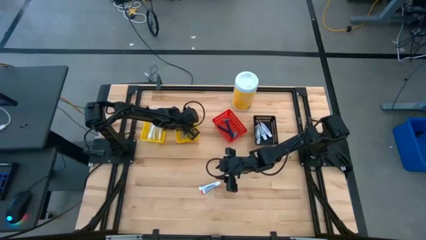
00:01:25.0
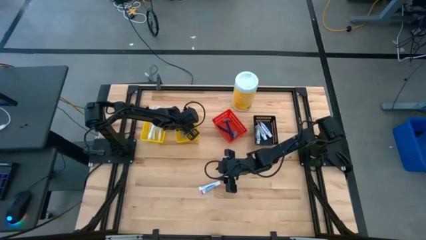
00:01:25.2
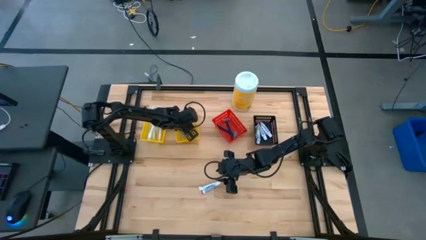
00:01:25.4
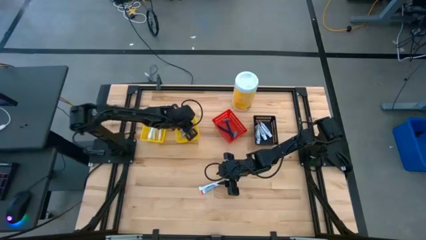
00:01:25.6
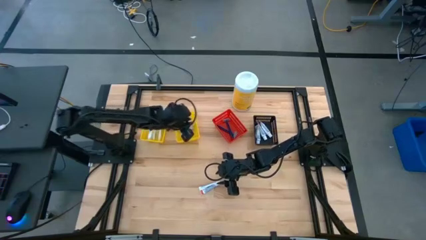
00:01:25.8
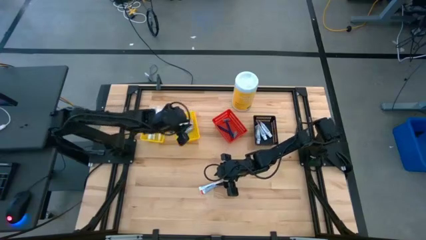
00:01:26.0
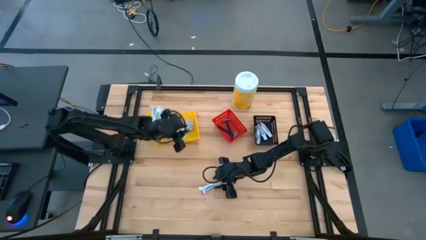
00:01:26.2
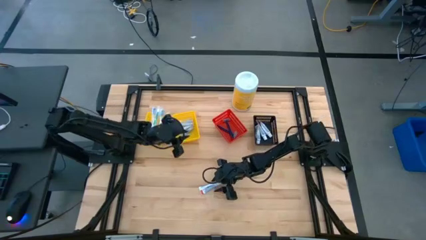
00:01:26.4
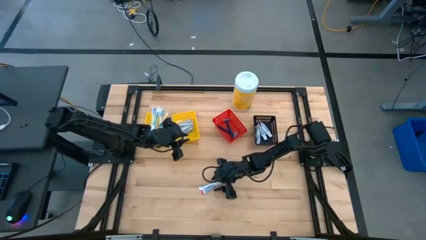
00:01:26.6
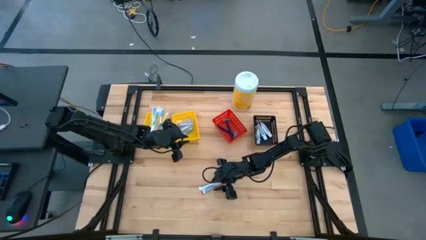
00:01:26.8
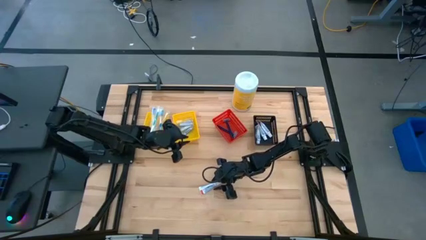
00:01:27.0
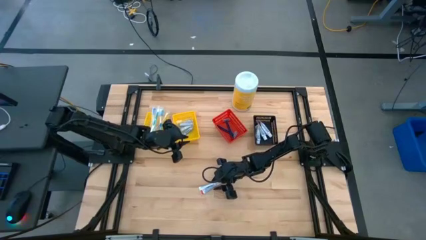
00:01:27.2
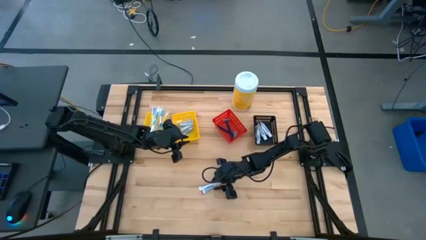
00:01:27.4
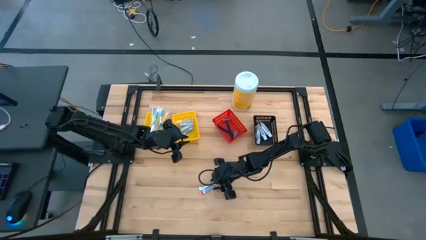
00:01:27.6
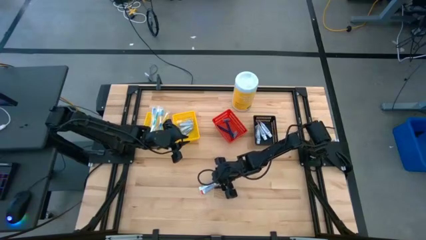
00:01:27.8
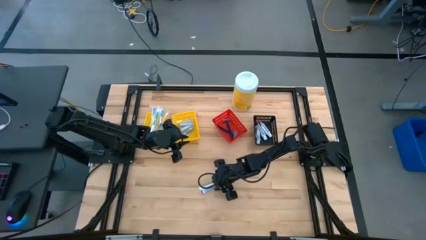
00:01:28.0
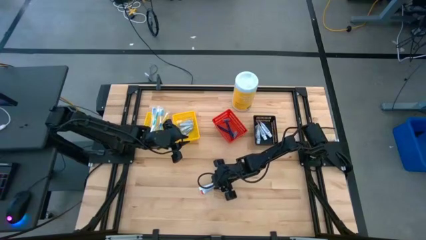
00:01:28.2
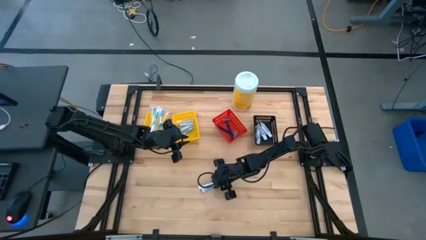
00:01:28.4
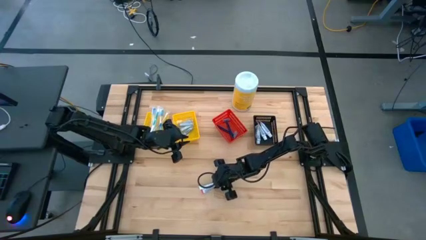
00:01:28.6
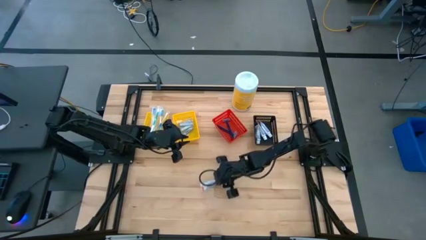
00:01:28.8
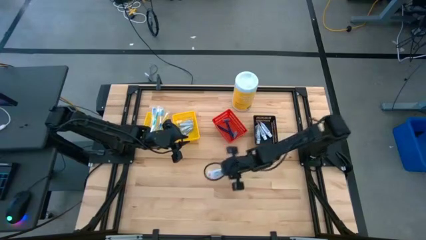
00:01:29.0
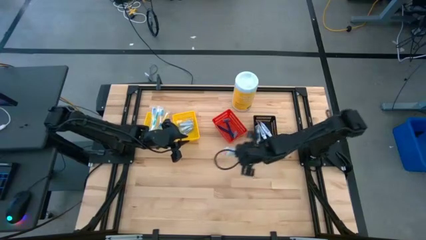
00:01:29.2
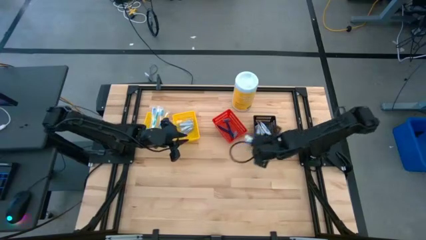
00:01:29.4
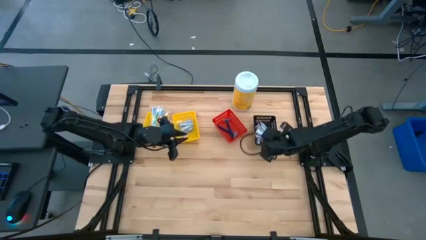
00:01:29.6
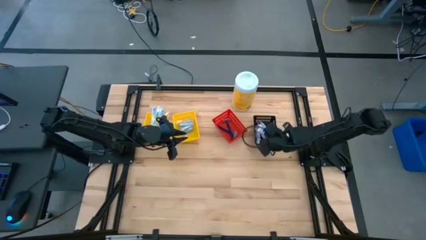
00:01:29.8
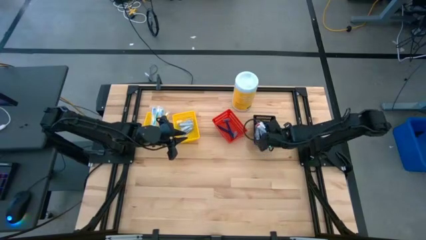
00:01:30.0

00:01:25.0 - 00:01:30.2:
Task: Pick & Place Travel size toiletries
Put the white toothpaste into the black bin

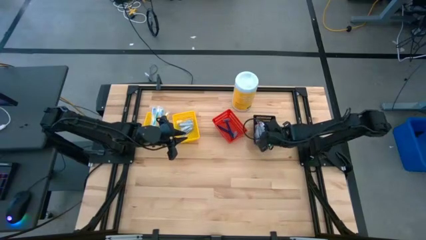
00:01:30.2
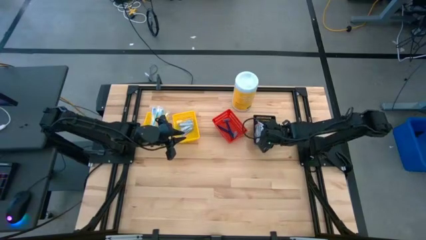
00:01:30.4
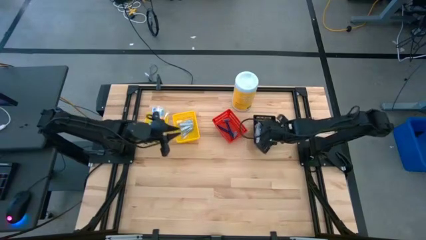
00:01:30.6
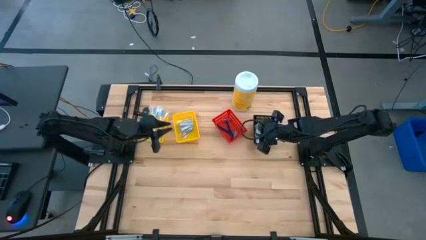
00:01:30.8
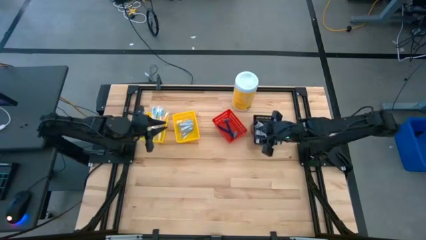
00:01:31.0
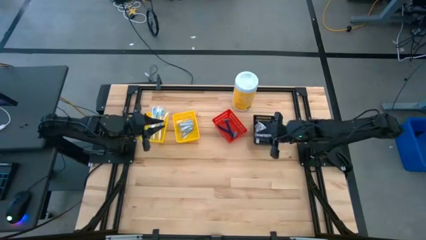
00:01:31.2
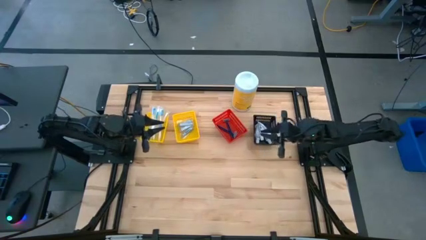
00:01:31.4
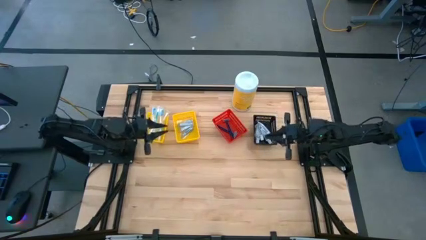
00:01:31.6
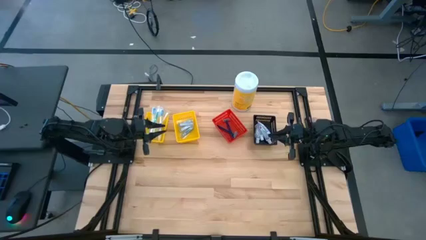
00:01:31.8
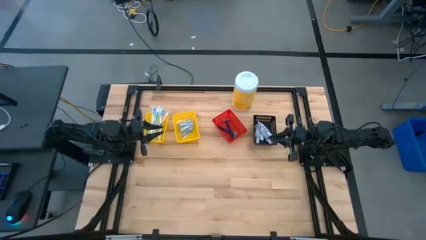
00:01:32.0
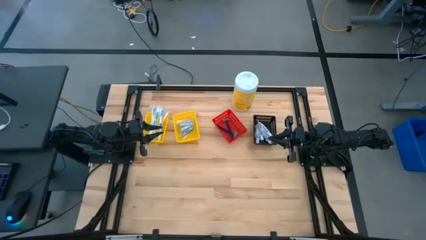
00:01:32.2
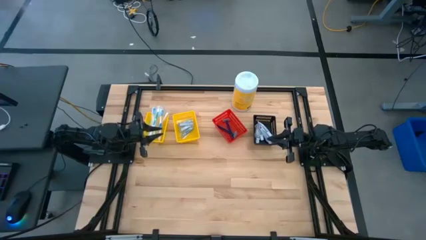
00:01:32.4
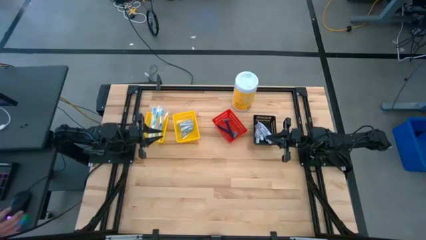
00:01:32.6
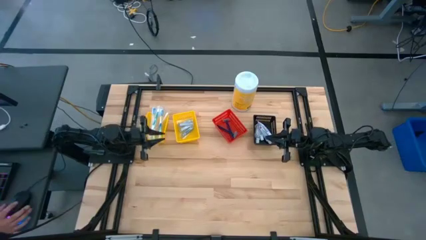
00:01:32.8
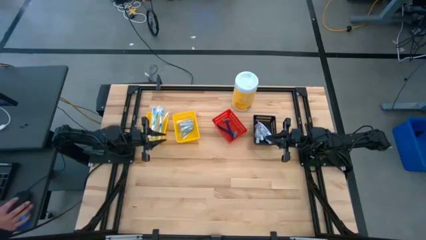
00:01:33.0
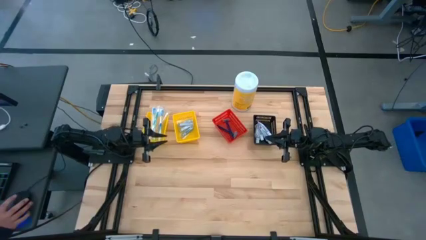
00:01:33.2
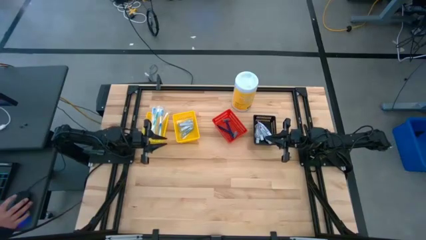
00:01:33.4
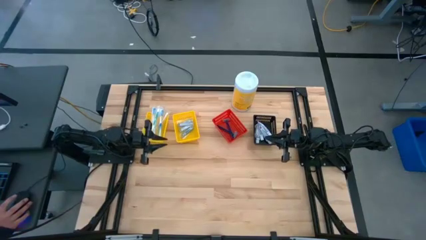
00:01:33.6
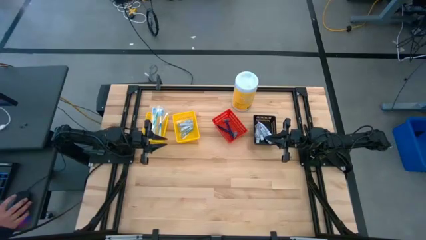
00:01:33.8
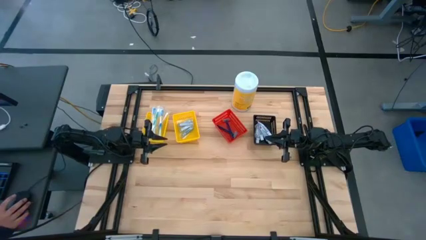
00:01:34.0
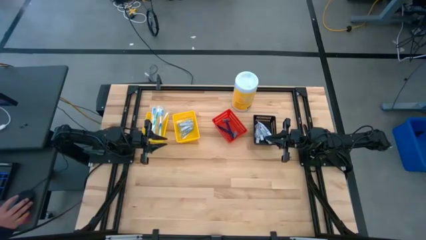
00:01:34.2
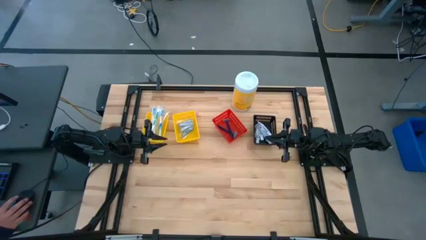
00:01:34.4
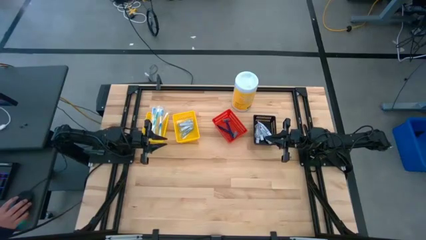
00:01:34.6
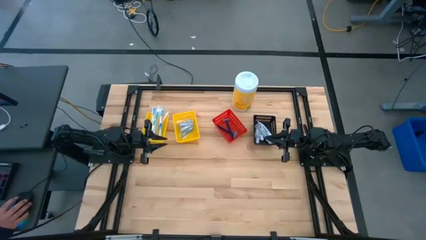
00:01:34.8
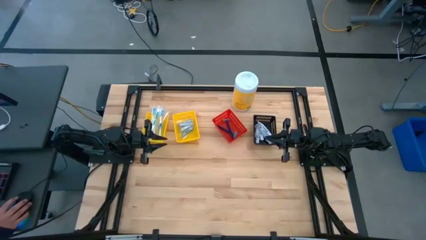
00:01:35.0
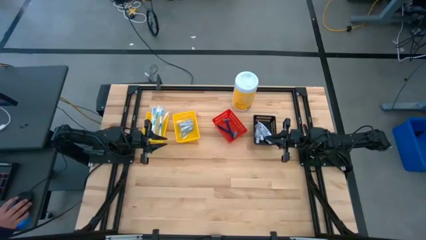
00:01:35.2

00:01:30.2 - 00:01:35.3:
Return to Home Position

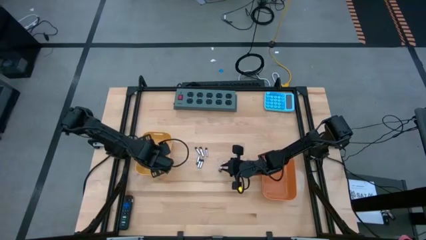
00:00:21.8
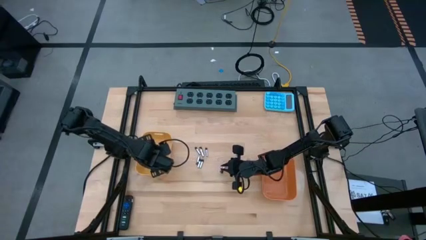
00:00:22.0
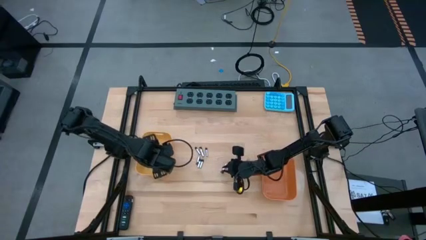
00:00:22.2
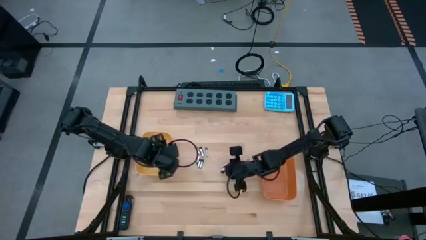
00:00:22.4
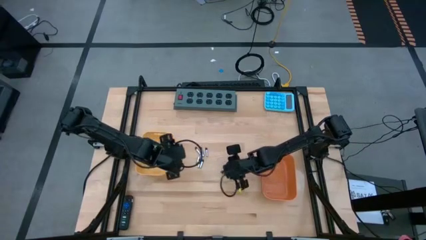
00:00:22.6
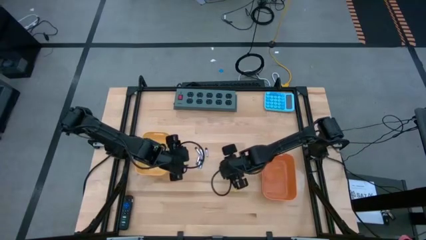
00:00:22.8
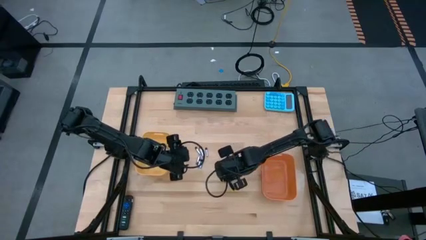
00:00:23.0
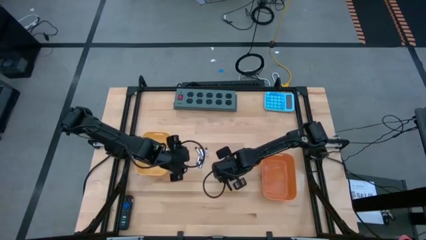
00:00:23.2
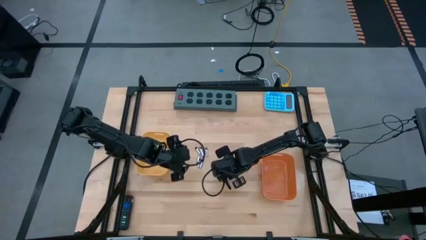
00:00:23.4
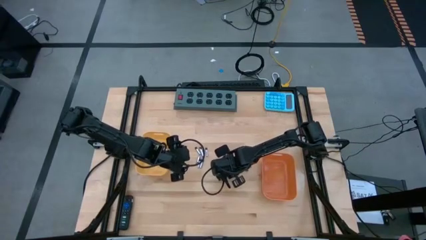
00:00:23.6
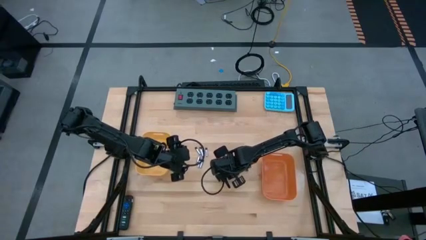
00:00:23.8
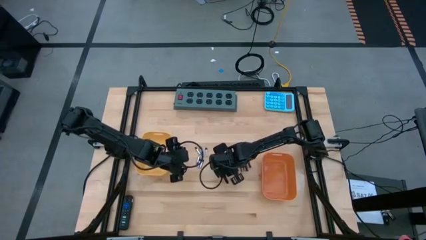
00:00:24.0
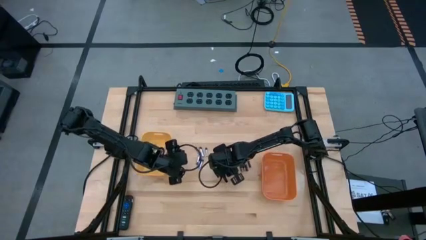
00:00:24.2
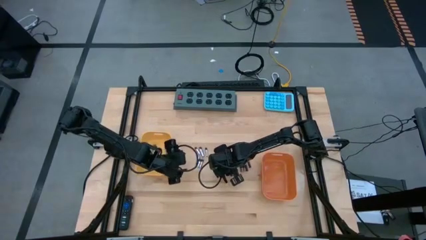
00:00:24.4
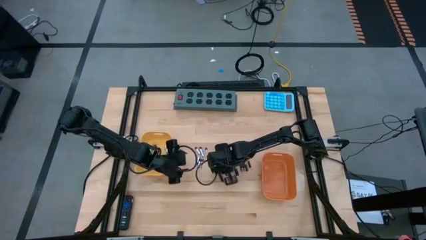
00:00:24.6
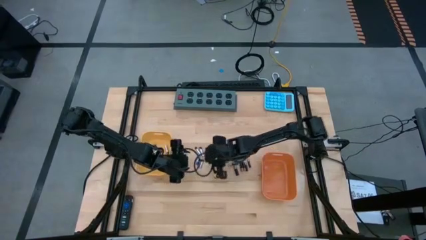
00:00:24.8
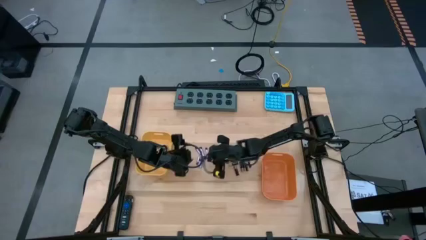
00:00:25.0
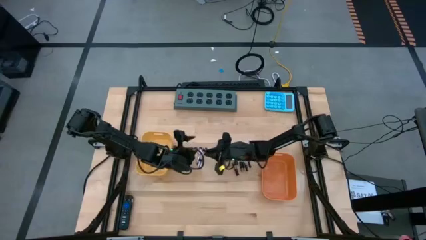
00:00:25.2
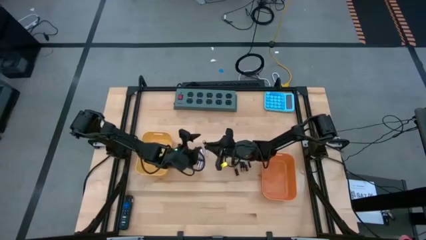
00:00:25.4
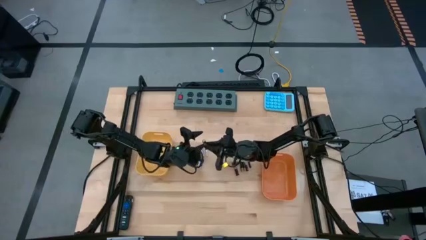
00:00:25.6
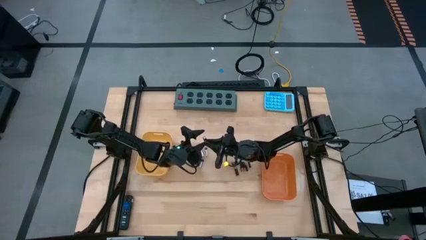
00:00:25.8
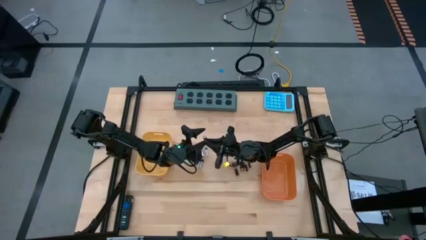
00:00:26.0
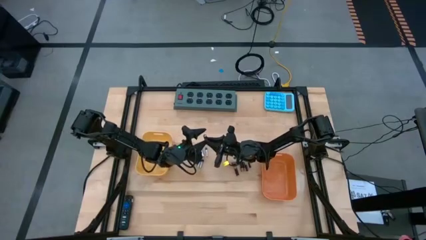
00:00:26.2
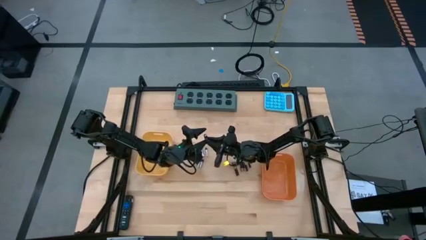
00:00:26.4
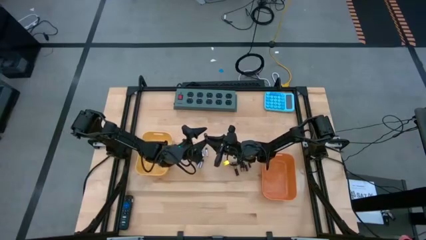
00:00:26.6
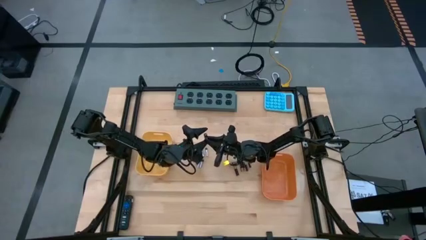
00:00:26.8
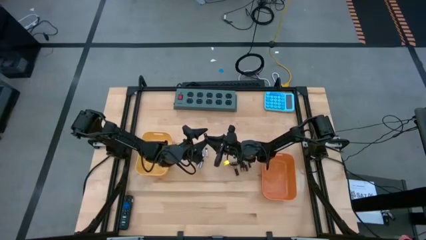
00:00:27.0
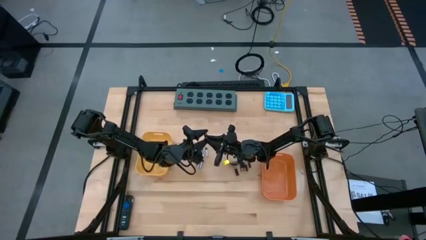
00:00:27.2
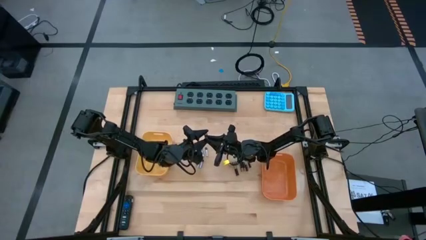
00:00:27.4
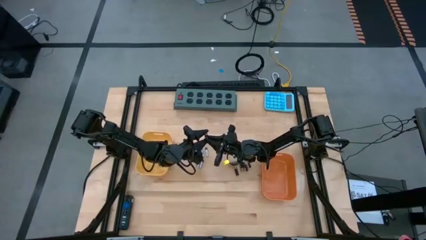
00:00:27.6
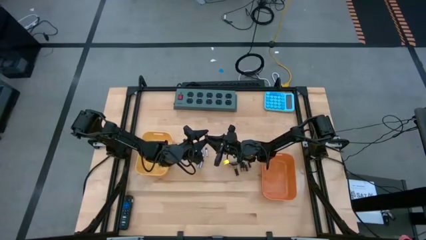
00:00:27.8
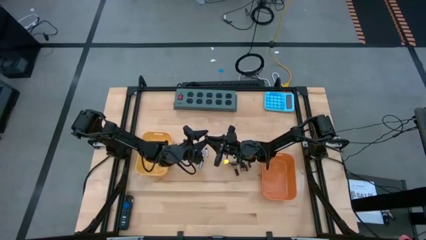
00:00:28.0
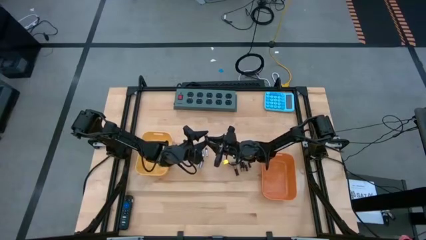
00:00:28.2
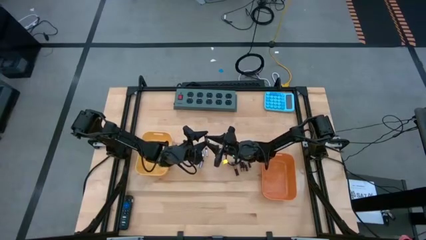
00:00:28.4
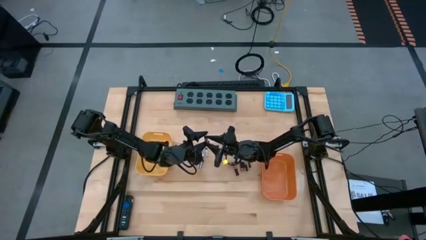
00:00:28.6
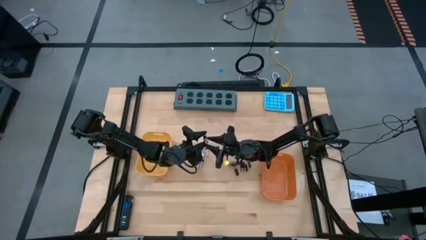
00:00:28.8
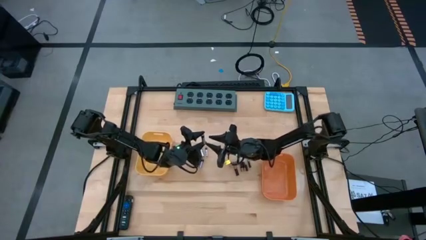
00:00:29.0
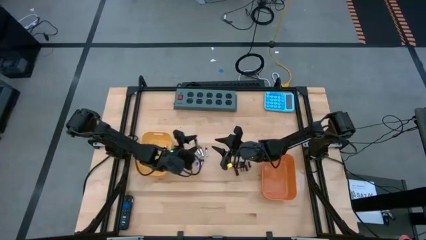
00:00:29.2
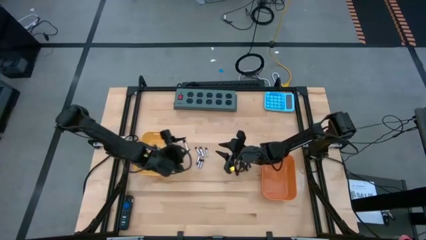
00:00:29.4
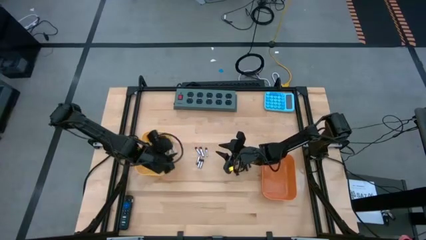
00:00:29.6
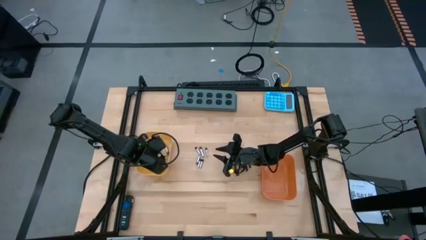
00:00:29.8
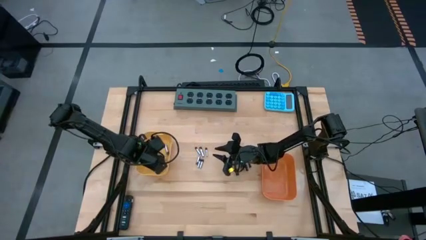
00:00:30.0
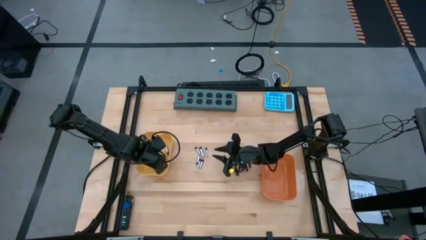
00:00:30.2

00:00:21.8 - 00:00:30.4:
Task: Sort batteries
Put the silver battery into the yellow bin
